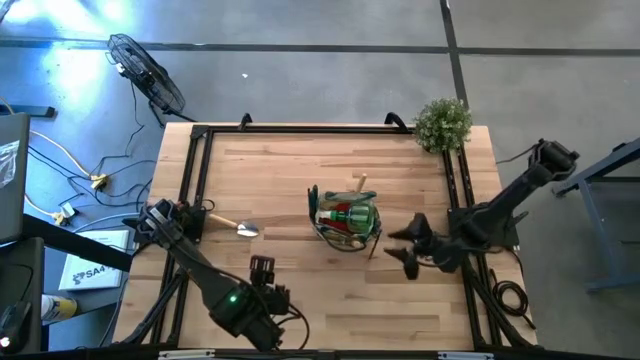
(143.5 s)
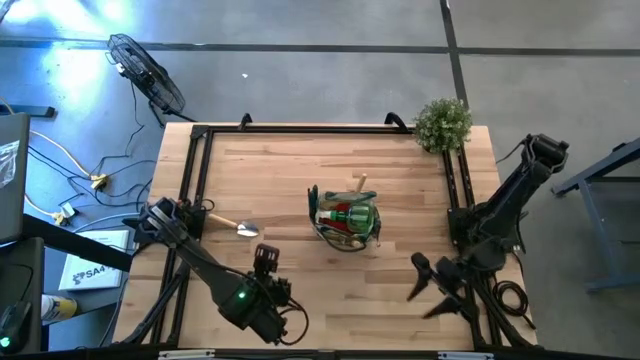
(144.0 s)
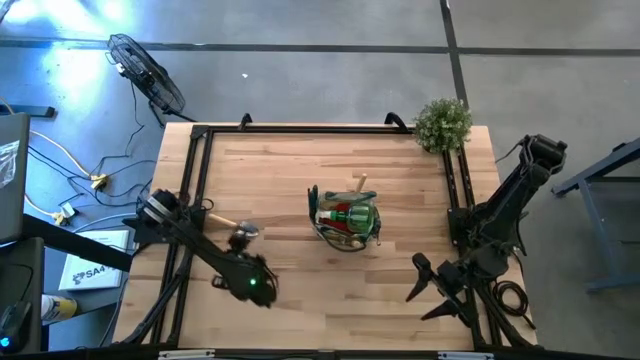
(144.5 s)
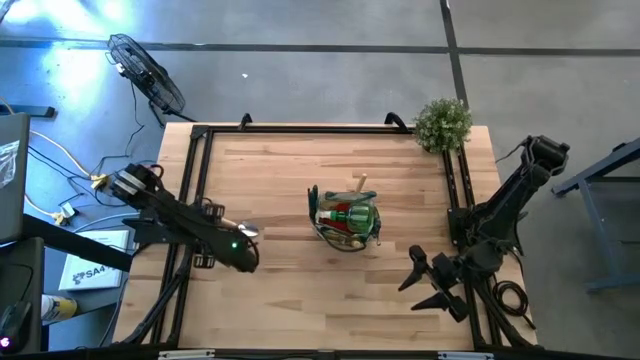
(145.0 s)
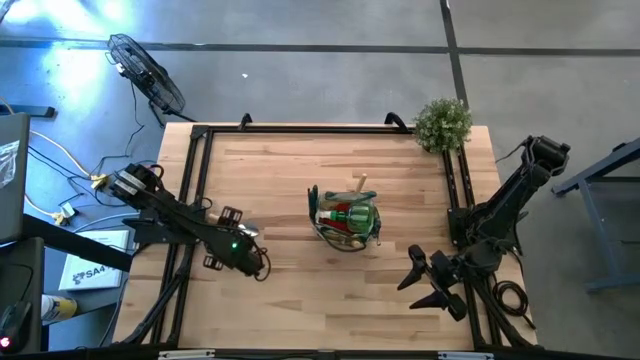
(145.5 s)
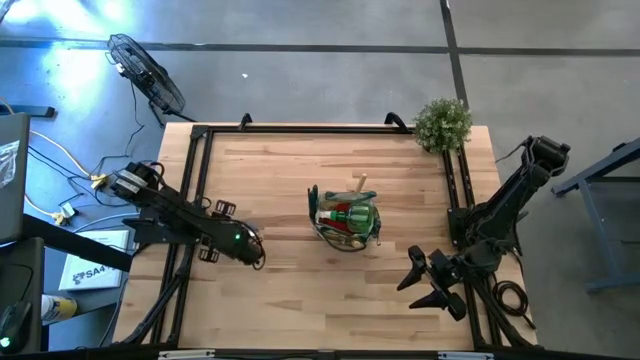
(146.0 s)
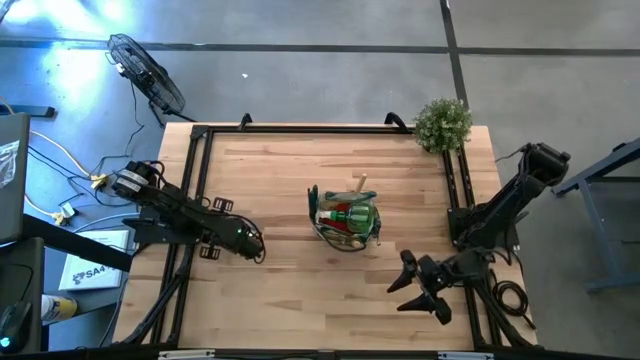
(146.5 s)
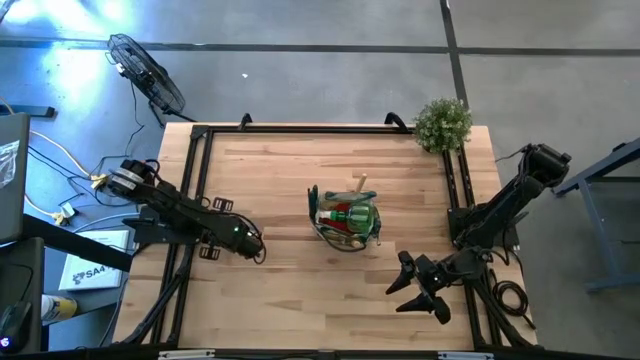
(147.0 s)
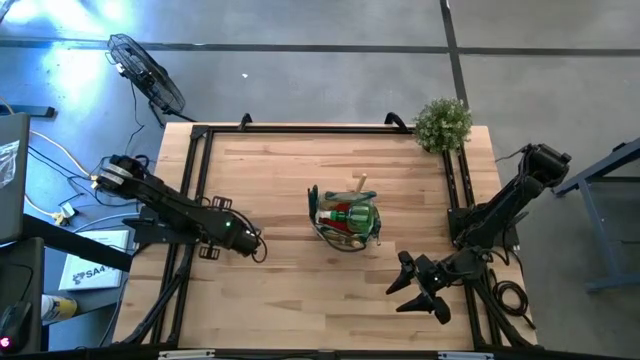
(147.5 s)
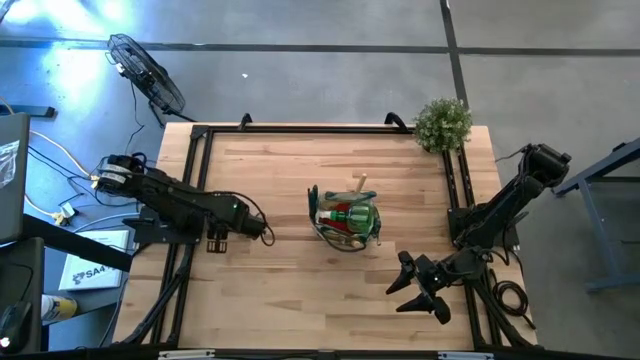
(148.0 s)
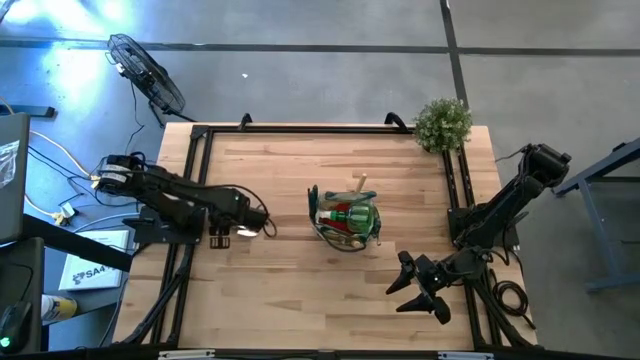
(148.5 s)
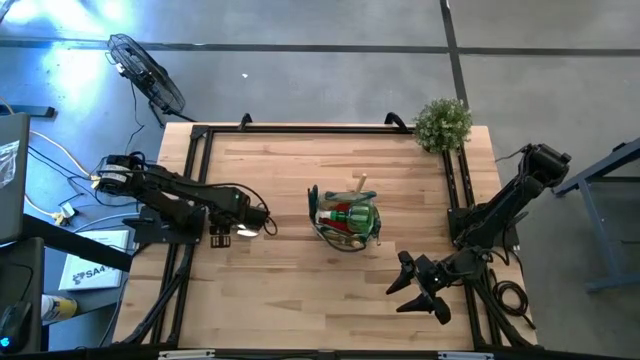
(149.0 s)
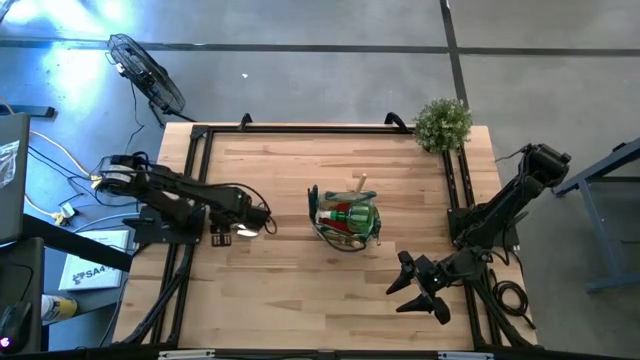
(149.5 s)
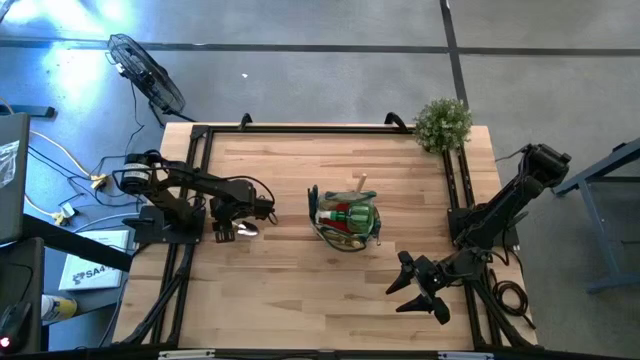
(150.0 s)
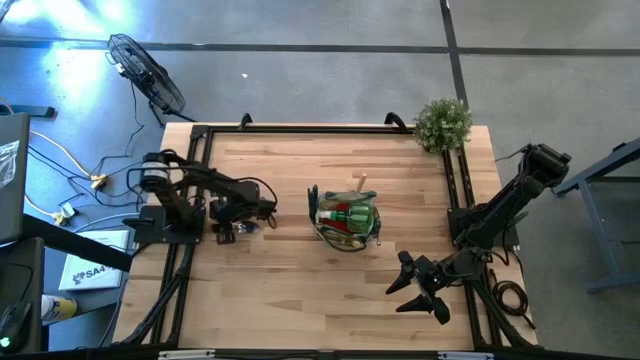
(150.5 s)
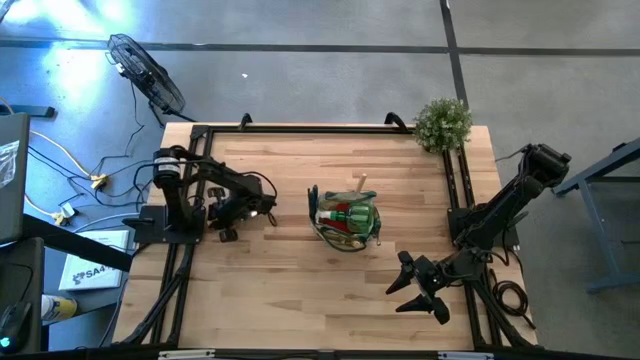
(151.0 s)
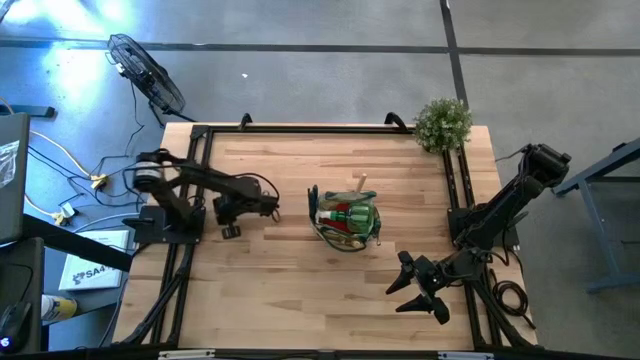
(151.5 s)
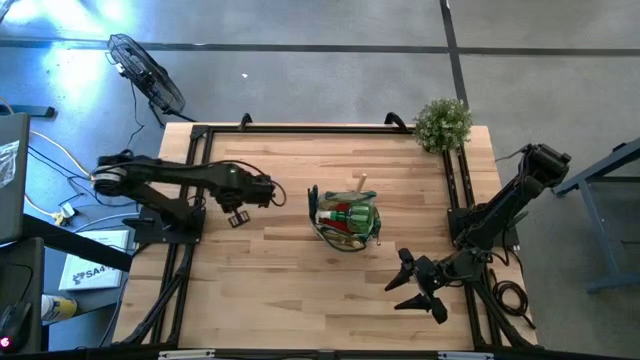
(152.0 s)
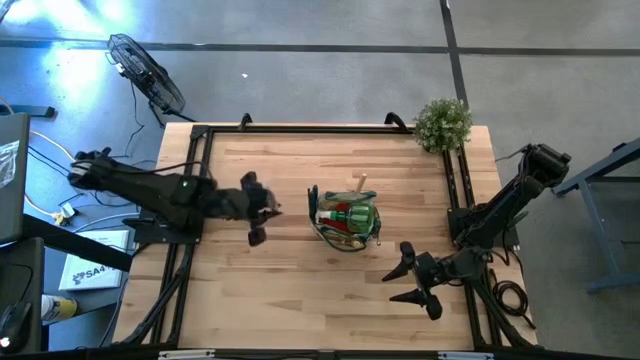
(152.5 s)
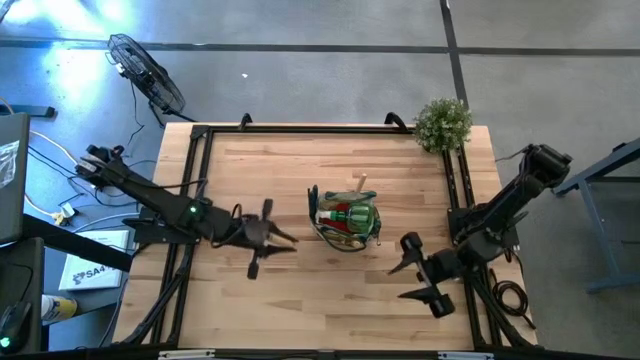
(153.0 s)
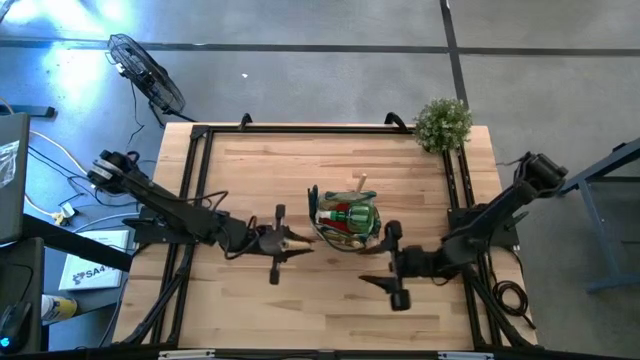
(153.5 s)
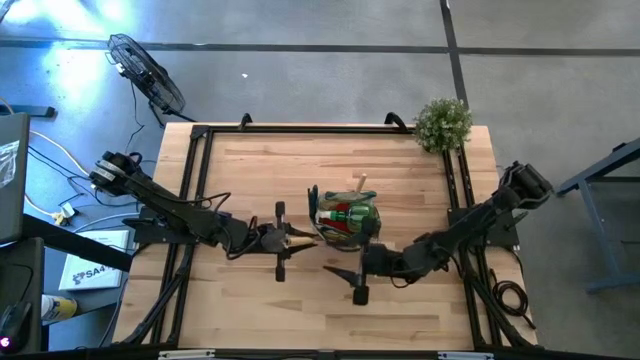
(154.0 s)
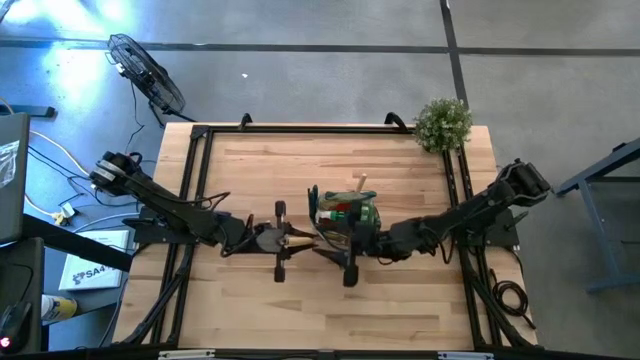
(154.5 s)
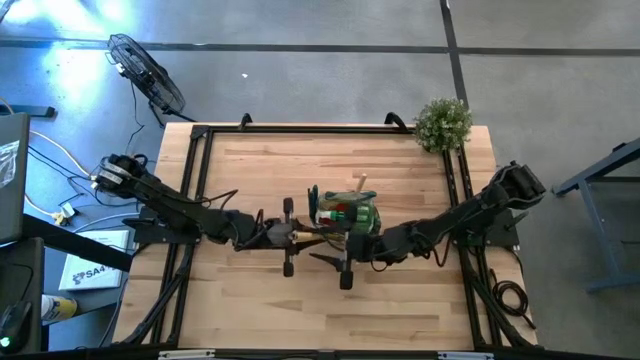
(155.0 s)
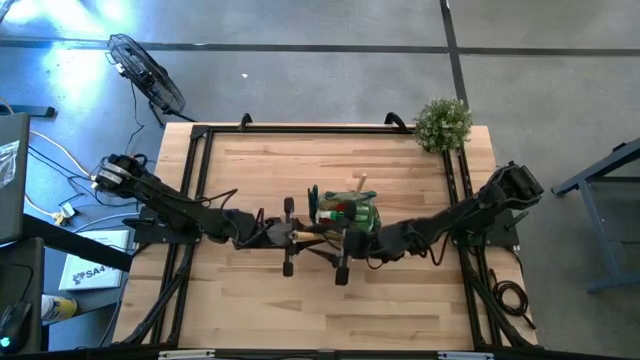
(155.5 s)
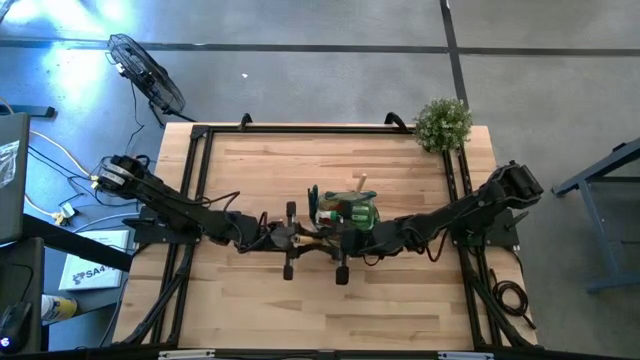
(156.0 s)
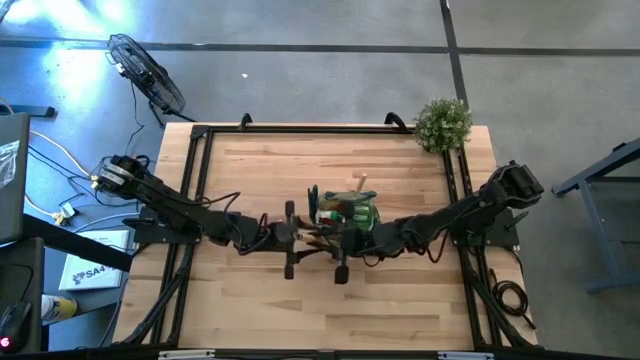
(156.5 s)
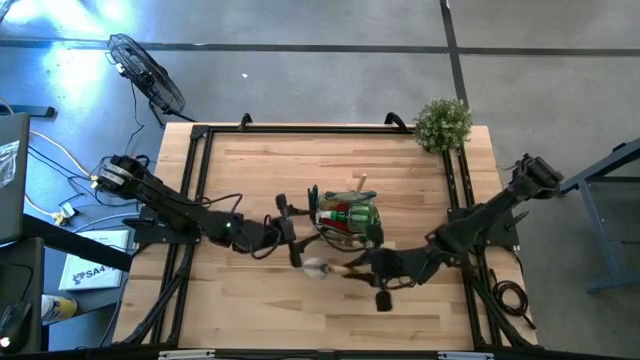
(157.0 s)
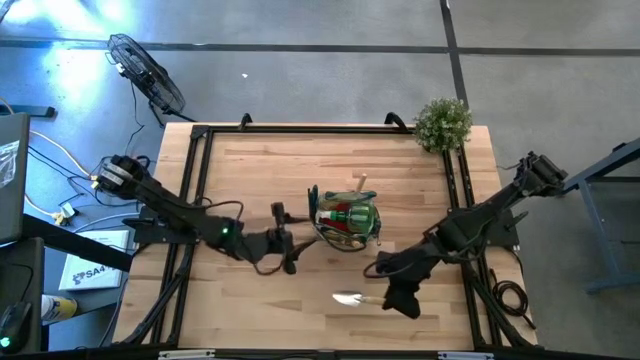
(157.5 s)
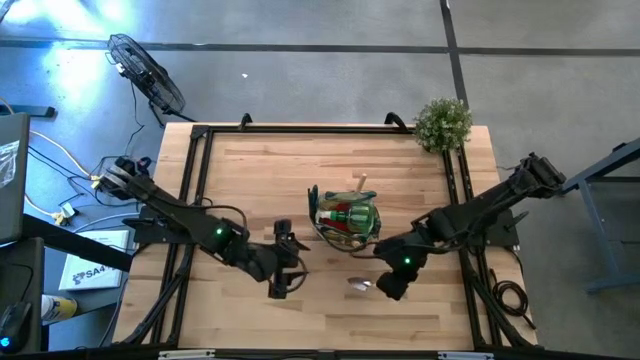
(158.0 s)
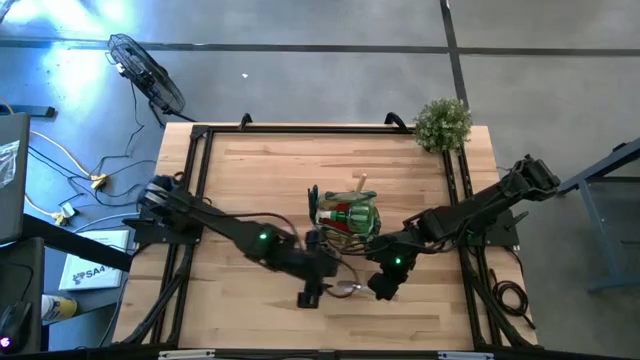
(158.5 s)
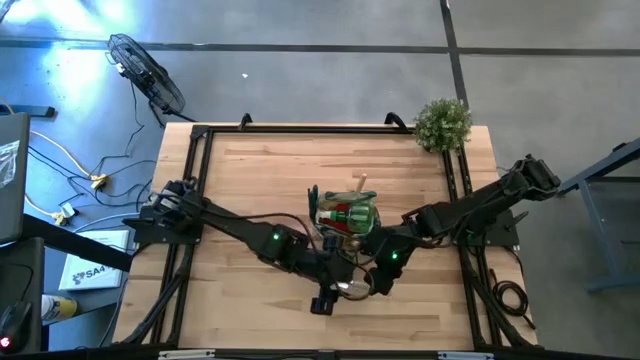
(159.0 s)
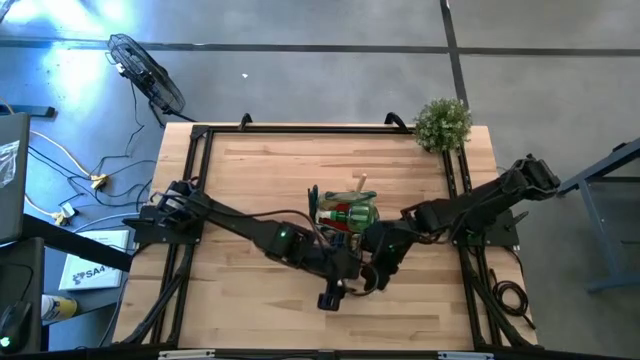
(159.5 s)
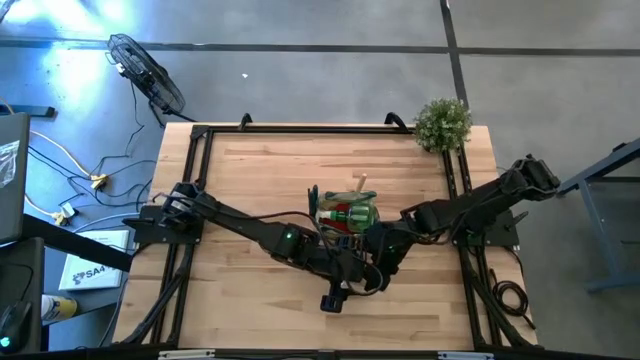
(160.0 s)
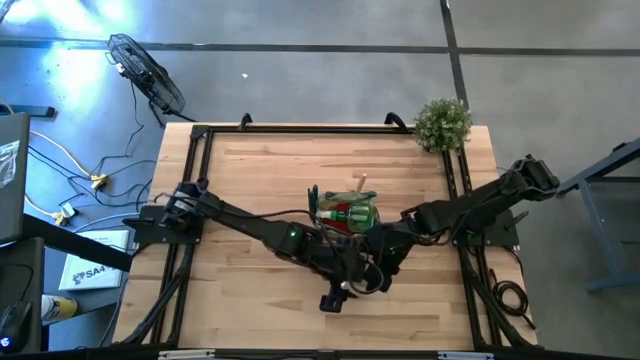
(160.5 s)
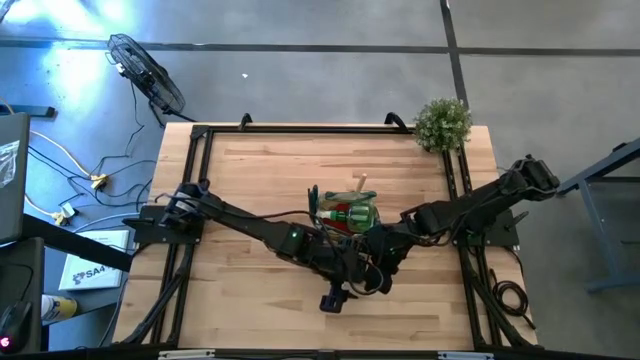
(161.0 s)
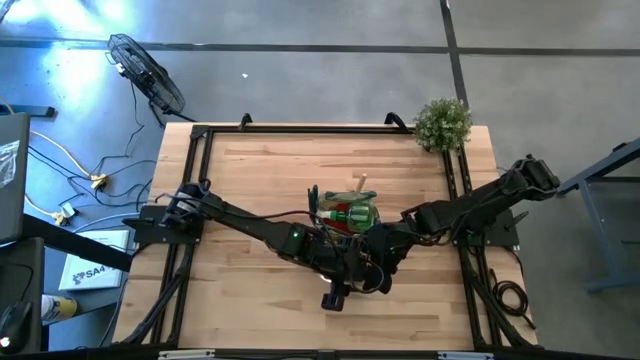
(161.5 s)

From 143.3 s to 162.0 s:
Task: Pick & Place Garden tools in Gardening bag
Put the brown trowel into the gardening bag

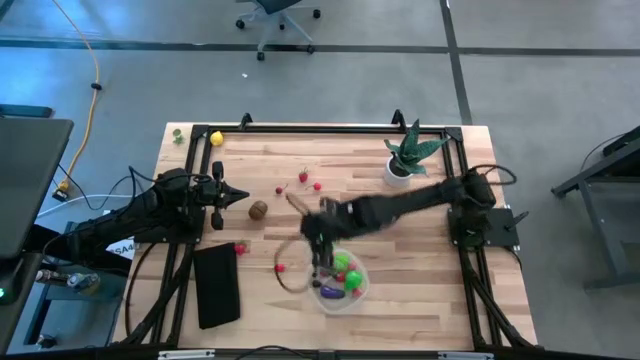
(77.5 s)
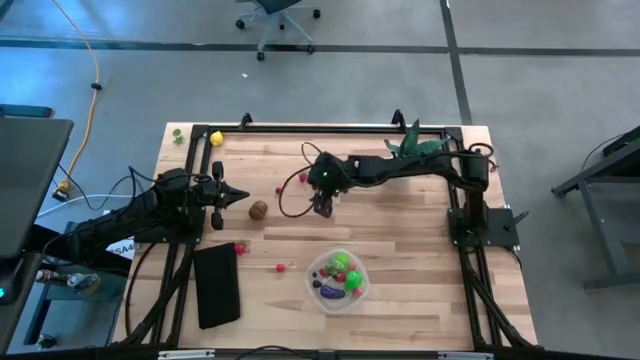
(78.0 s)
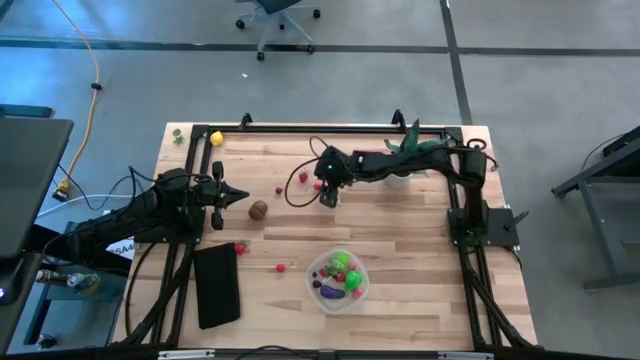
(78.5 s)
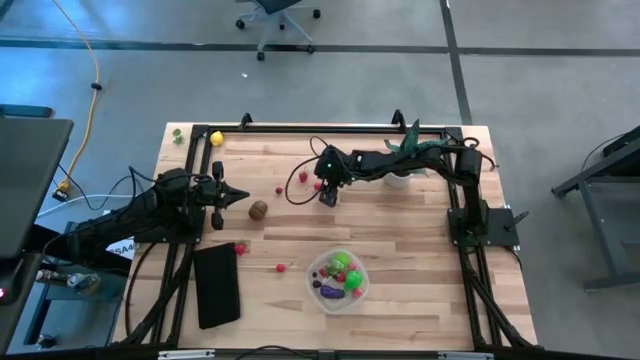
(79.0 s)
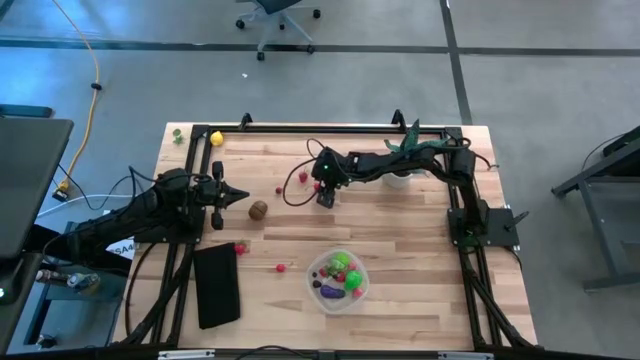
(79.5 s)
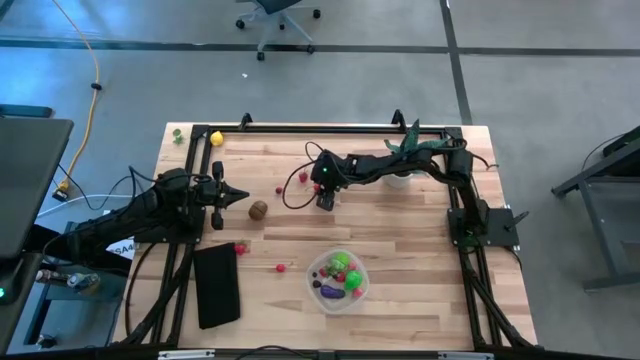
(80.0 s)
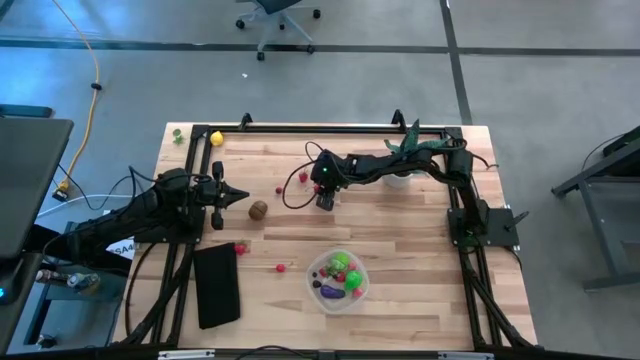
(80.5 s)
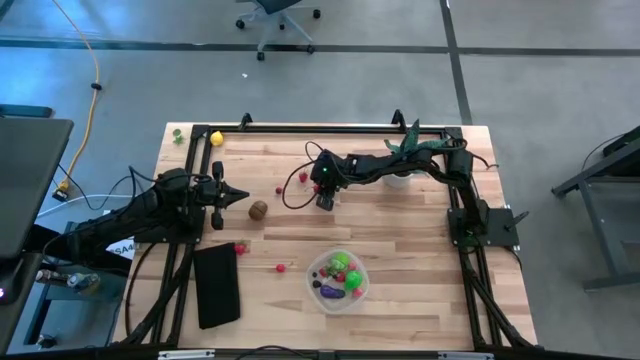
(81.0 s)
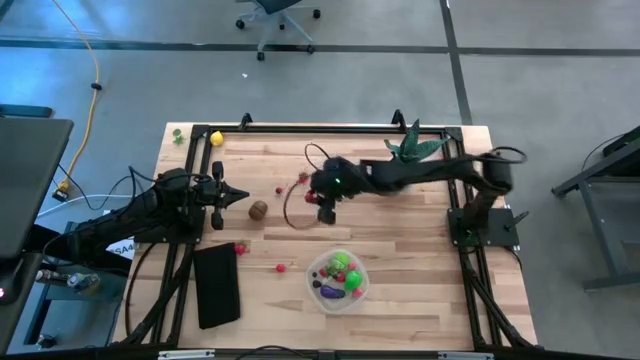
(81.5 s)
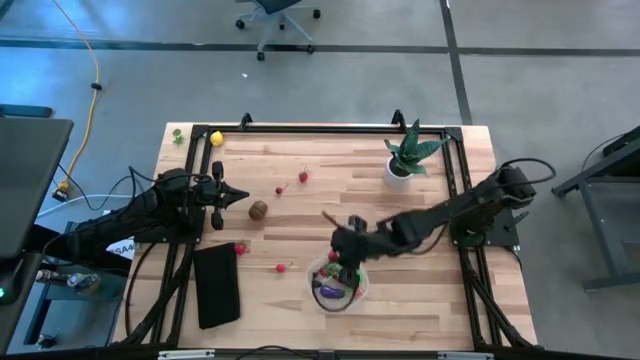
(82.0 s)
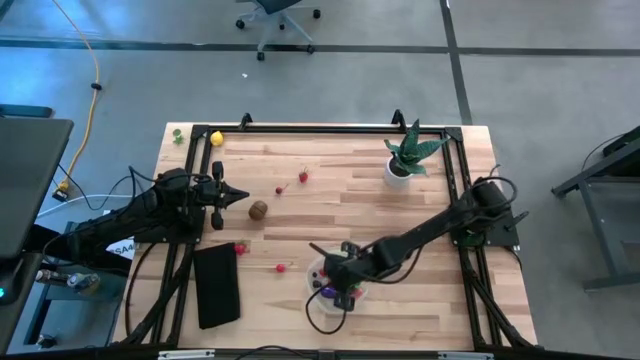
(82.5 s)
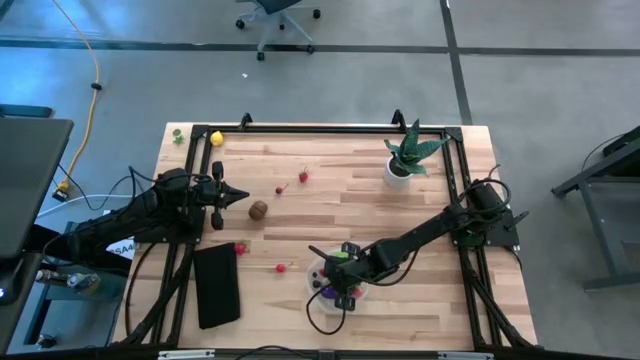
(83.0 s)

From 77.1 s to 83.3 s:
Task: Pick and placing Produce into tupperware
Put the red cherry into the transparent container
